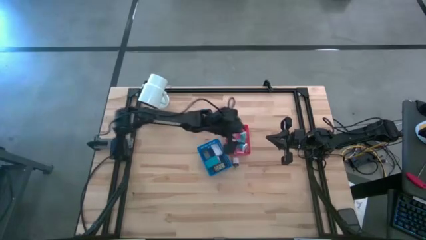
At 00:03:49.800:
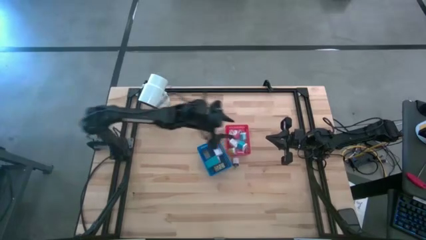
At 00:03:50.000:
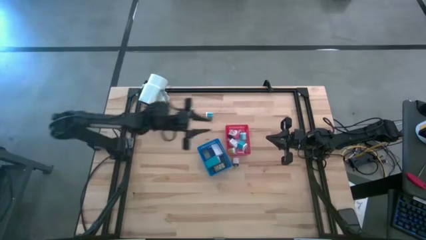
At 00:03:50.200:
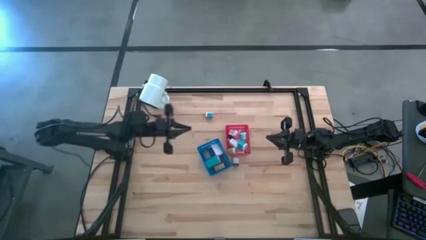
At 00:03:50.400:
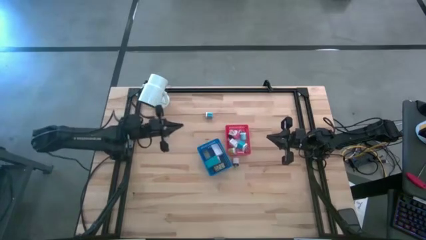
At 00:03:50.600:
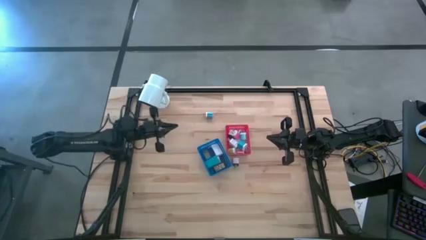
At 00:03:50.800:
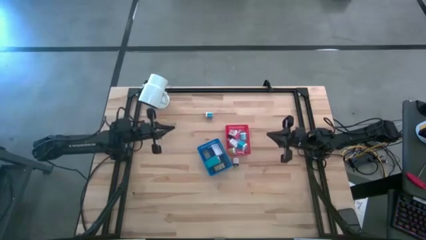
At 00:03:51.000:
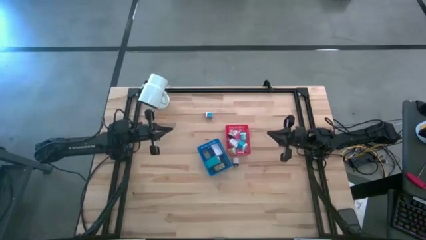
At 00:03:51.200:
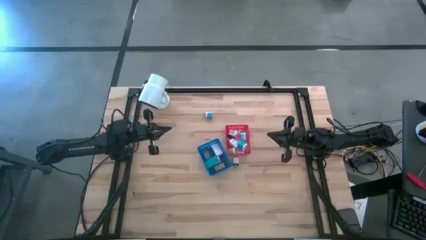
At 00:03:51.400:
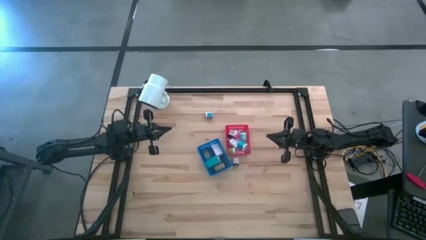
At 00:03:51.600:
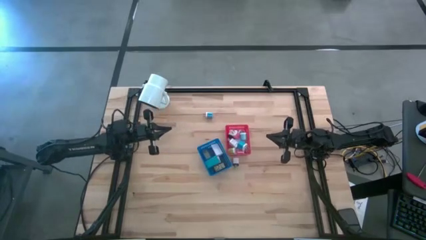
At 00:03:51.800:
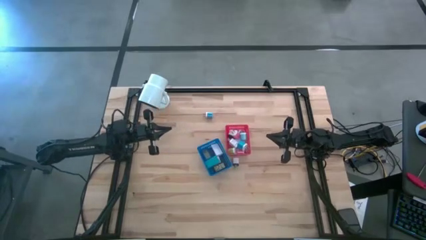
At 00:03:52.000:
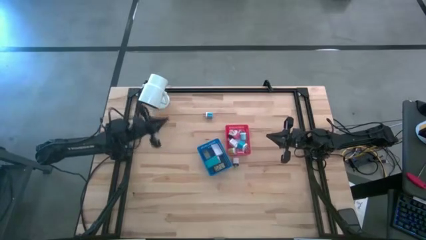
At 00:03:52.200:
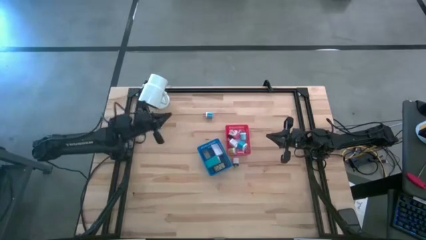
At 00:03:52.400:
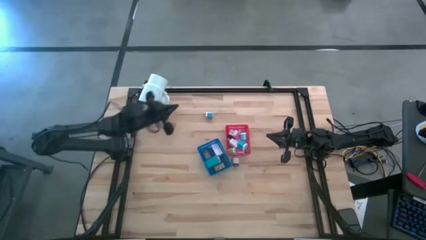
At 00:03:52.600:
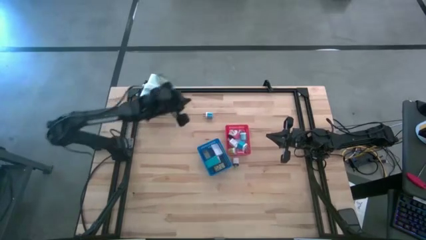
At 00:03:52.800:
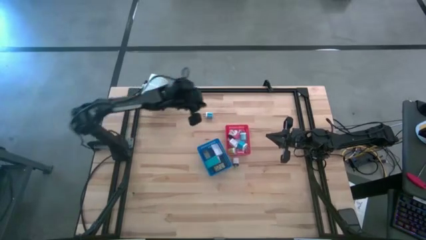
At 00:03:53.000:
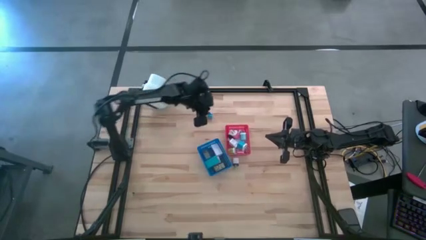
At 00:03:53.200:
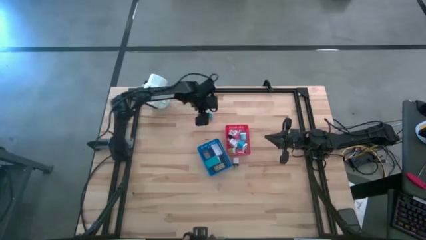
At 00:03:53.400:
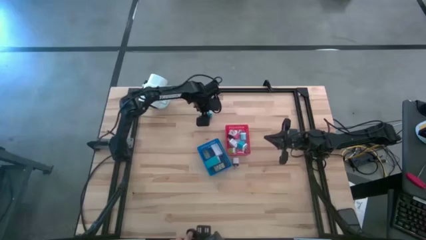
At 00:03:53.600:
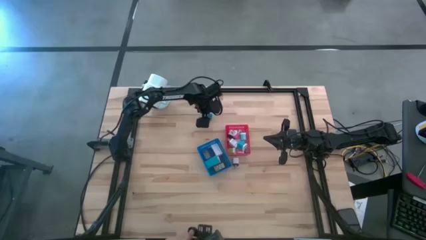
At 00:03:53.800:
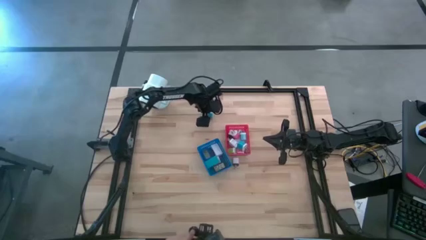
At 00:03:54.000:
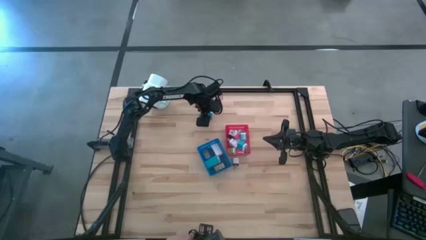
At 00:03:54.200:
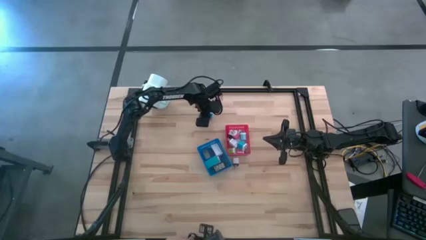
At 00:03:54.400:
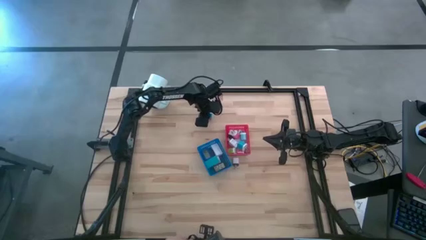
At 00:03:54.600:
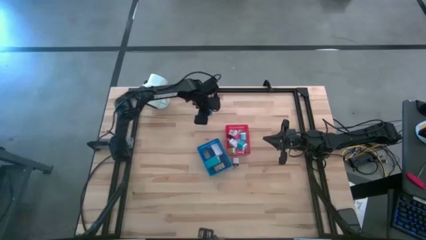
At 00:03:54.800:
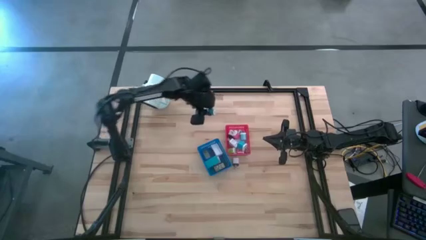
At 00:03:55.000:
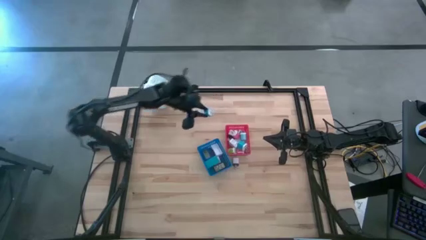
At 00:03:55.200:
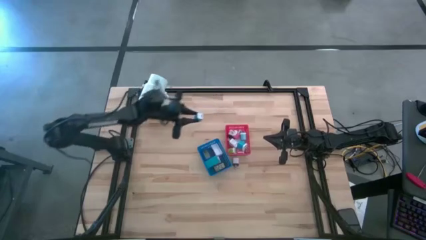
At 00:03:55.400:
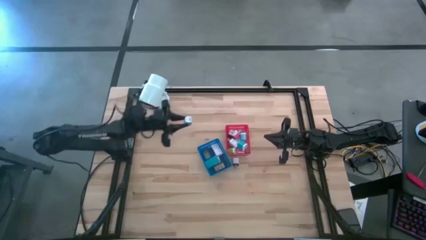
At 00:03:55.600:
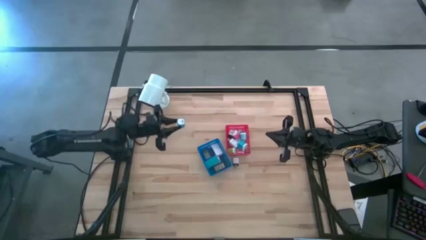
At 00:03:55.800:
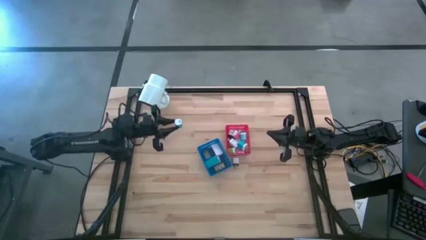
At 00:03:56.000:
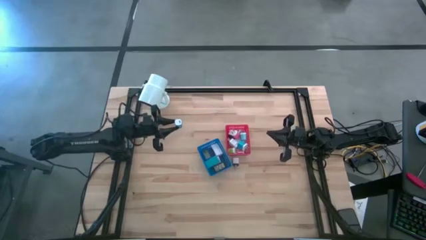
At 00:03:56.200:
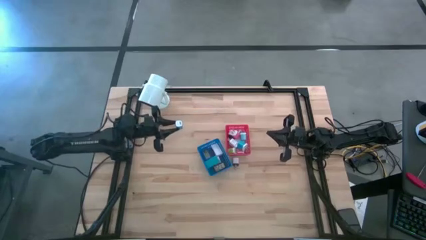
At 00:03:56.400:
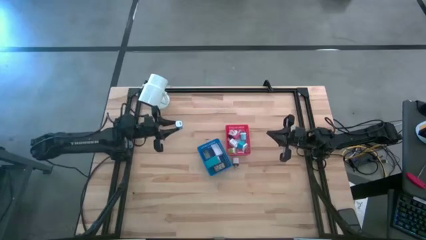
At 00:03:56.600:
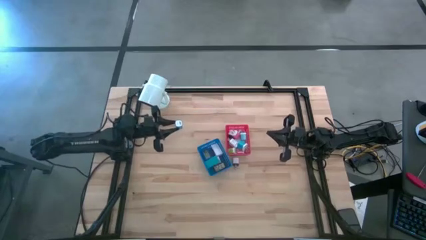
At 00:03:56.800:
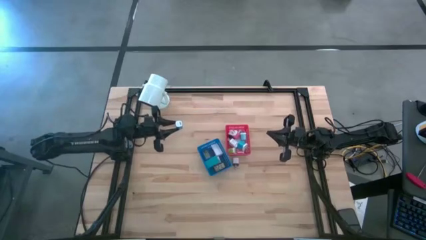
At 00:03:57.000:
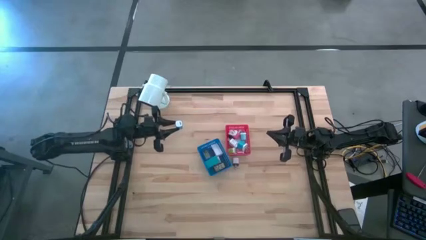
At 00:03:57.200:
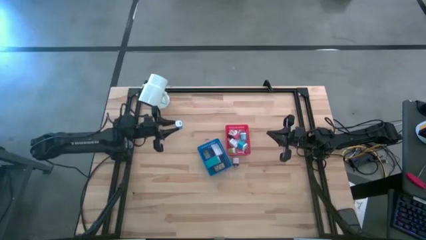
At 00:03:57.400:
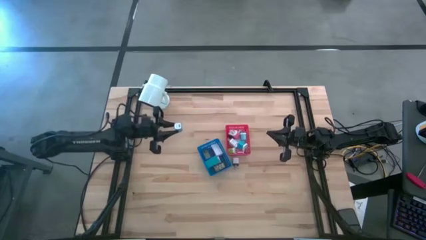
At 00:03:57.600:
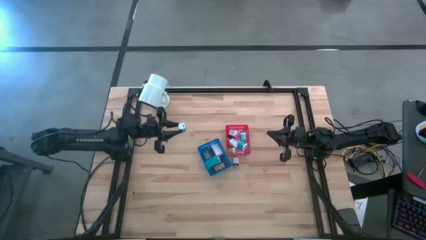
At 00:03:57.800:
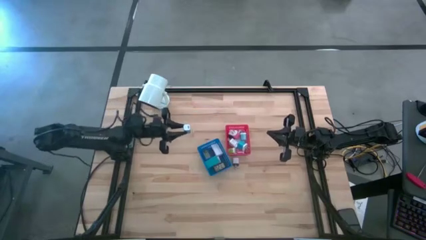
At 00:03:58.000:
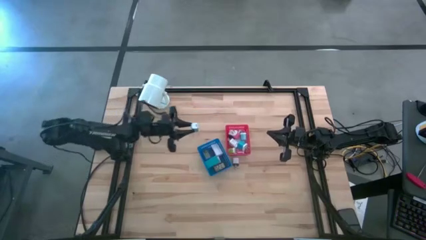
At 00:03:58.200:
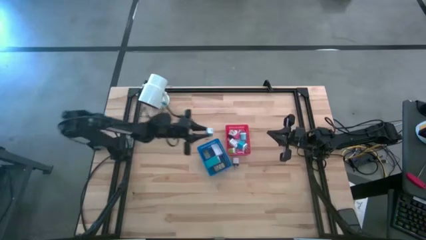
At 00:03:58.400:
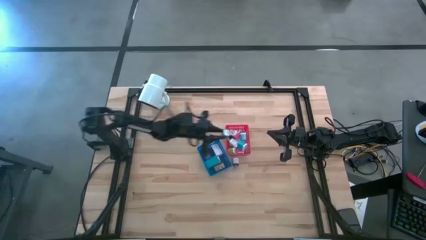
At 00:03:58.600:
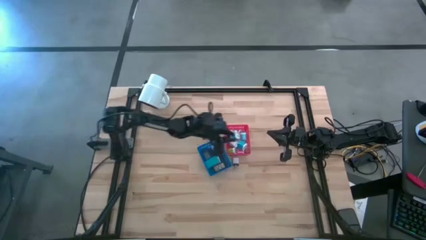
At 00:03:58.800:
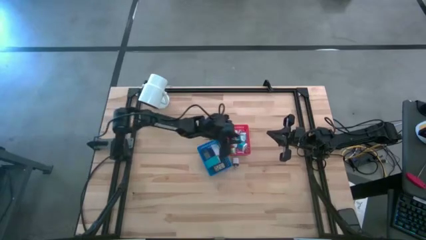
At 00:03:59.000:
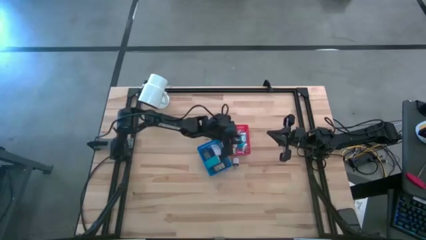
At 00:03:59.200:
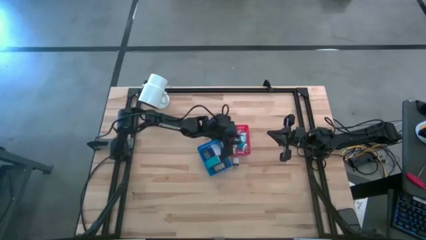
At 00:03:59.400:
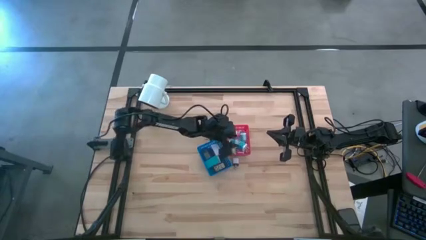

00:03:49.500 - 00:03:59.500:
Task: Pick & Place Office items
Put the light blue charger adapter into red bin
